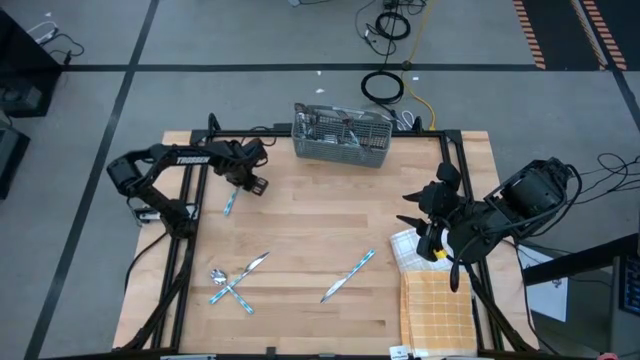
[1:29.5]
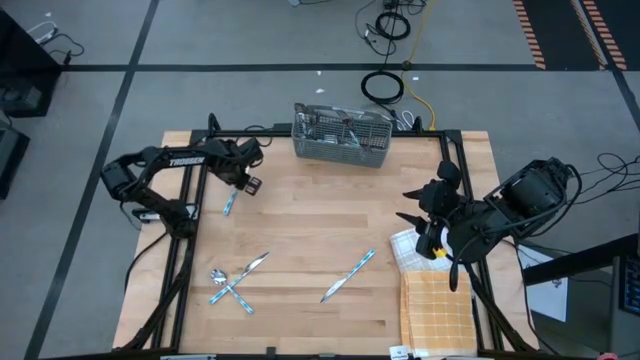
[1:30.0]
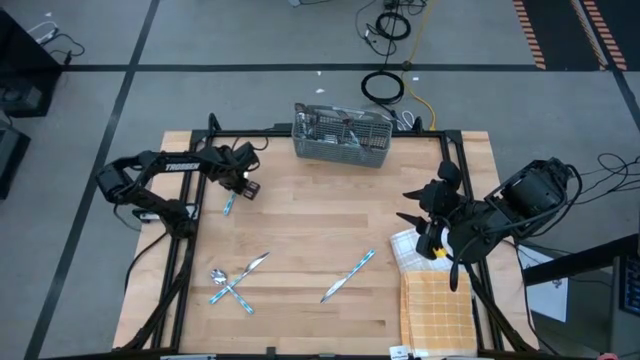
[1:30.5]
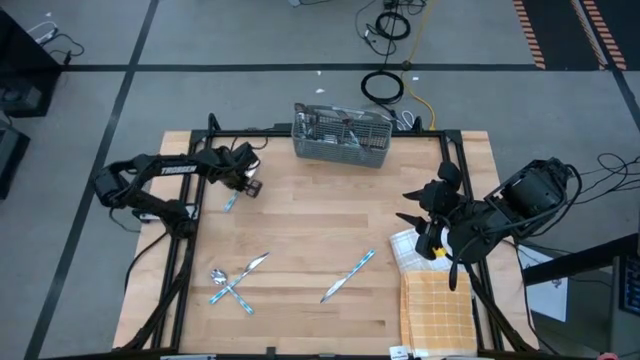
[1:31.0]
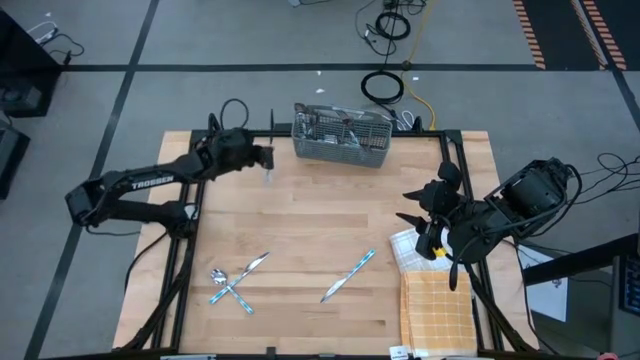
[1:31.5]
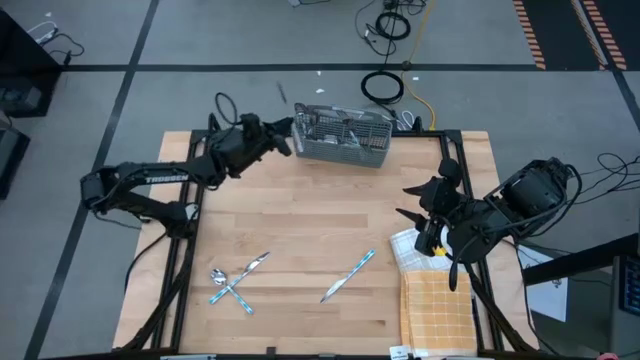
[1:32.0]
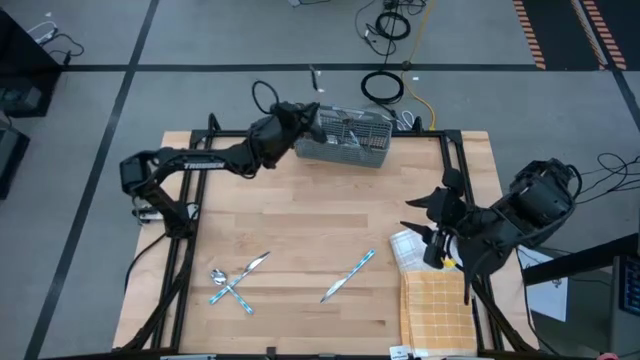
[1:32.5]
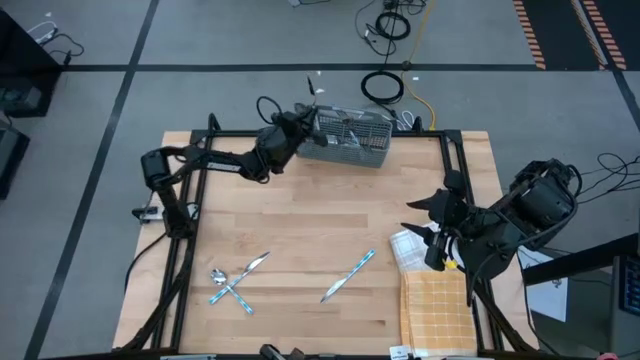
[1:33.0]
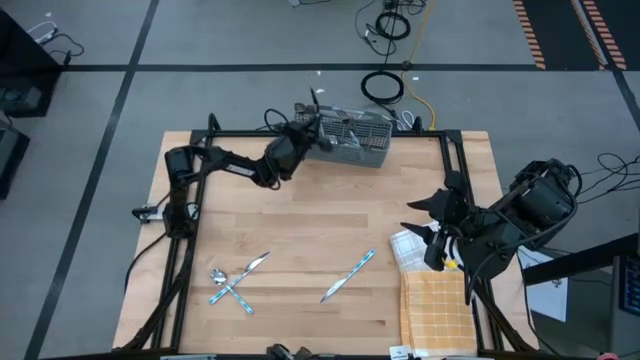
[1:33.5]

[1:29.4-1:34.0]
Task: Sort silverware
Put the top left blue table knife into the gray silverware basket

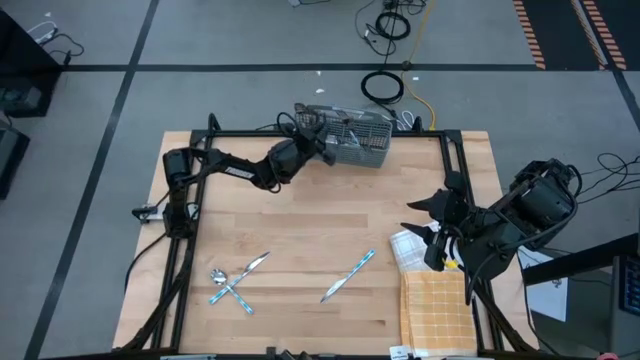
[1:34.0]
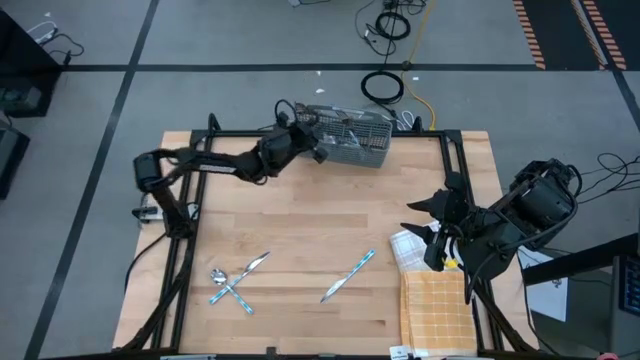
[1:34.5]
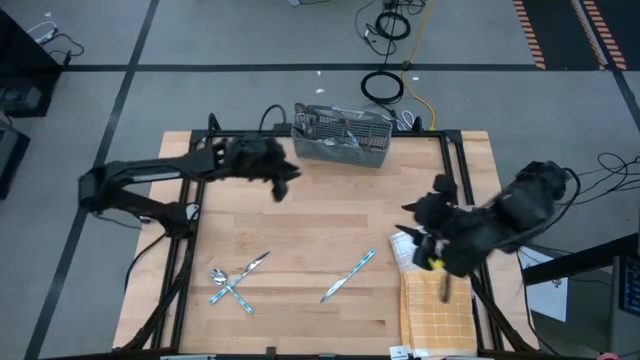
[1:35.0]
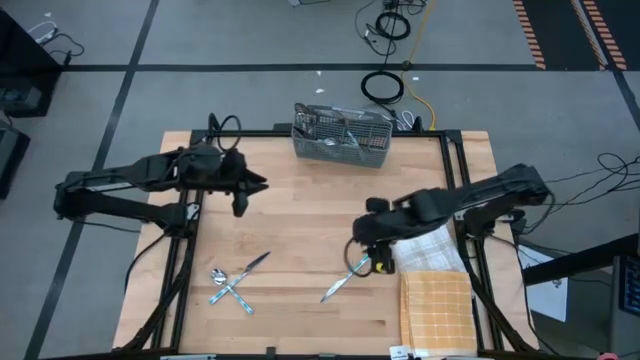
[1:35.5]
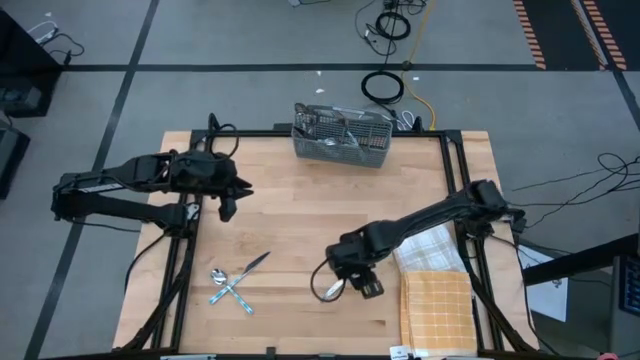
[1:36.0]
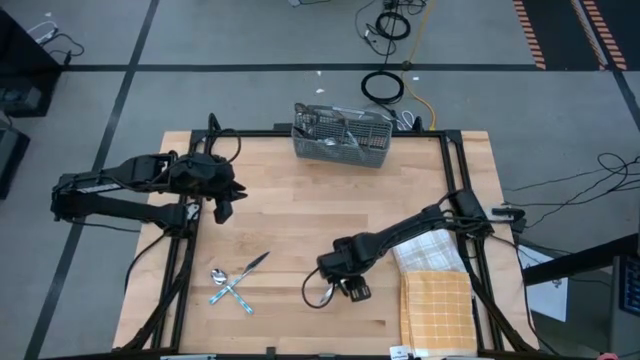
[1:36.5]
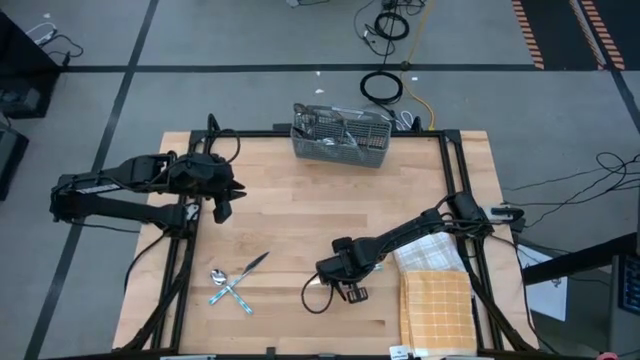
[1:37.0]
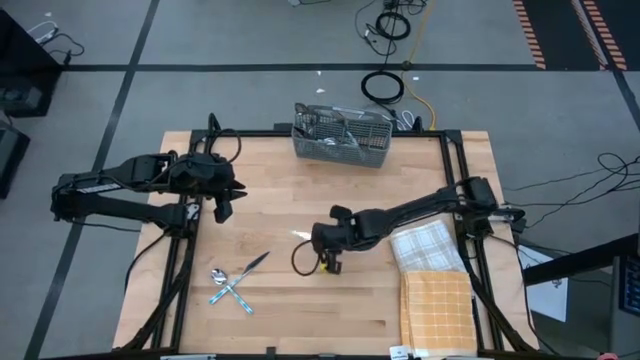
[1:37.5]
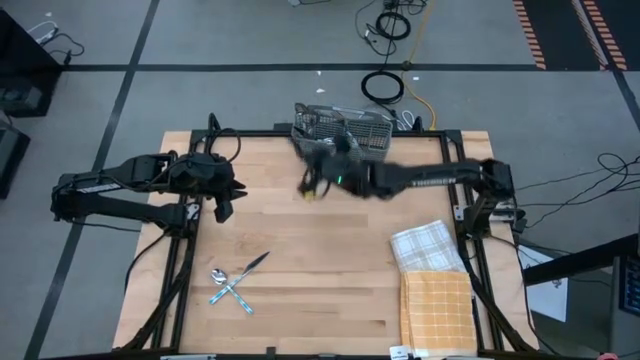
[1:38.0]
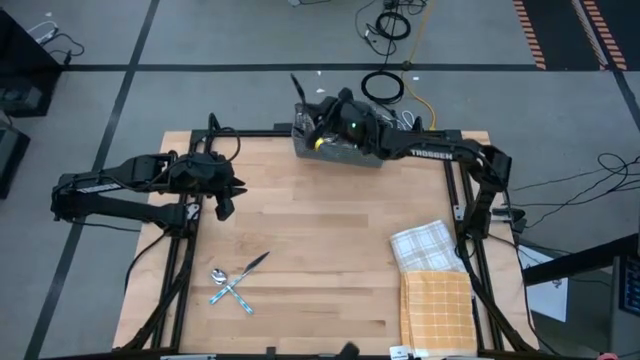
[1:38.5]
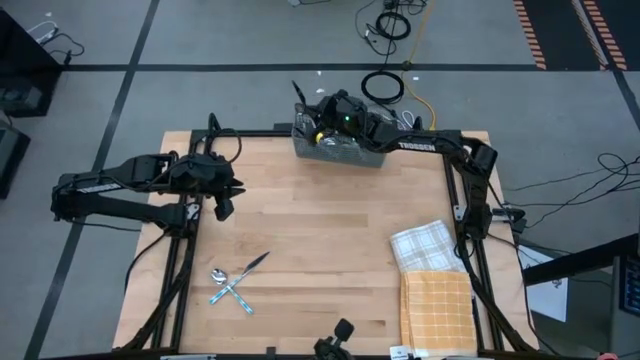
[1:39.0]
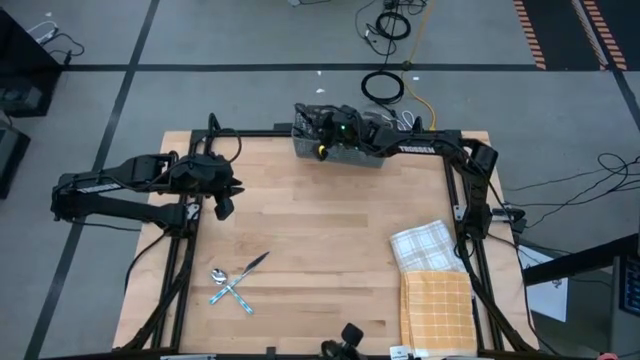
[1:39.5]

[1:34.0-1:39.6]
Put the right blue table knife into the gray silverware basket

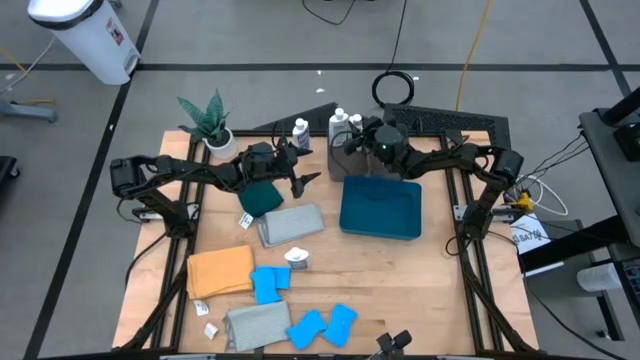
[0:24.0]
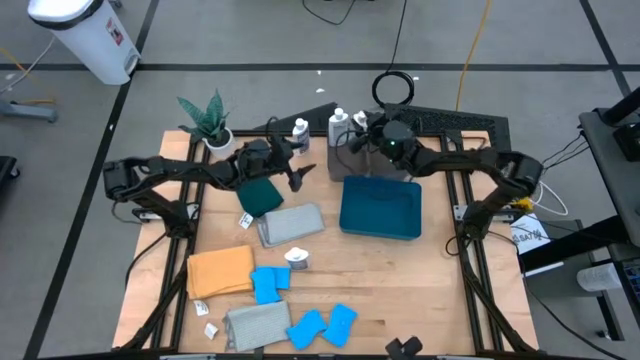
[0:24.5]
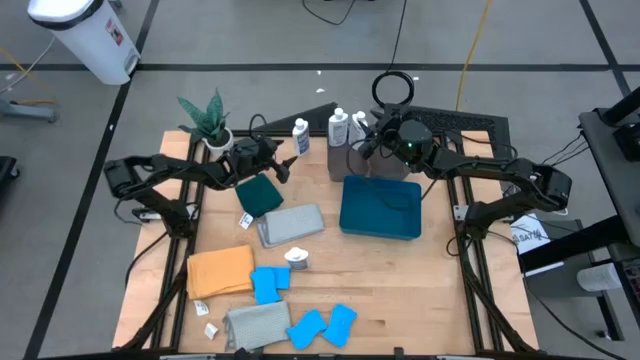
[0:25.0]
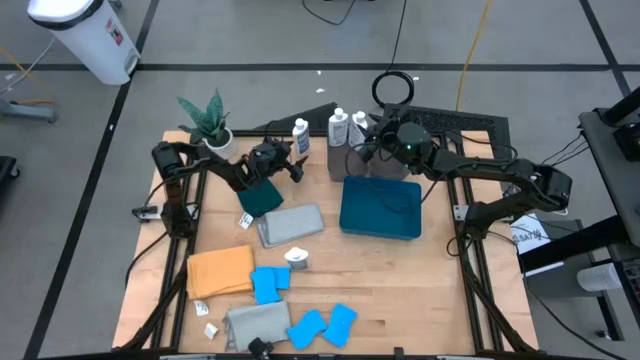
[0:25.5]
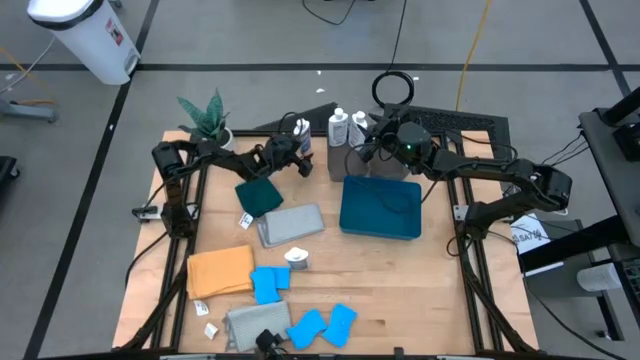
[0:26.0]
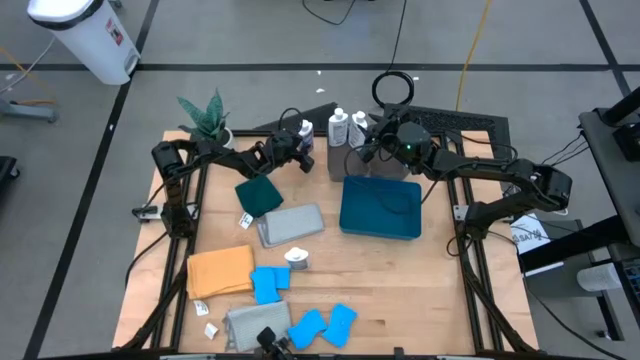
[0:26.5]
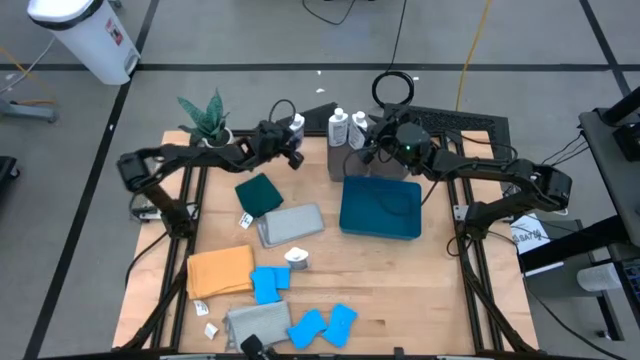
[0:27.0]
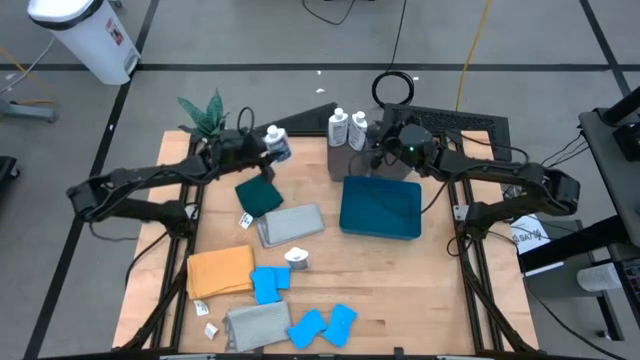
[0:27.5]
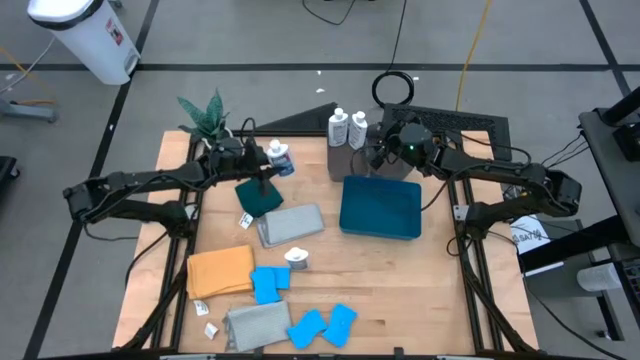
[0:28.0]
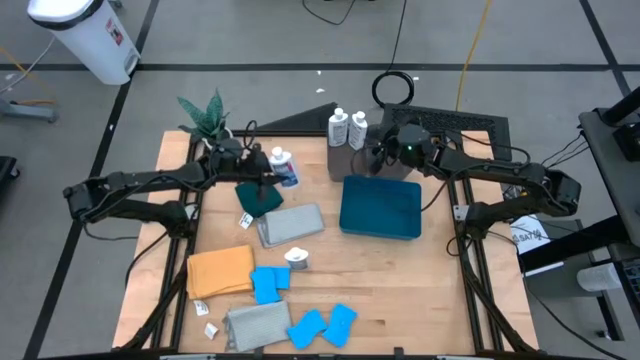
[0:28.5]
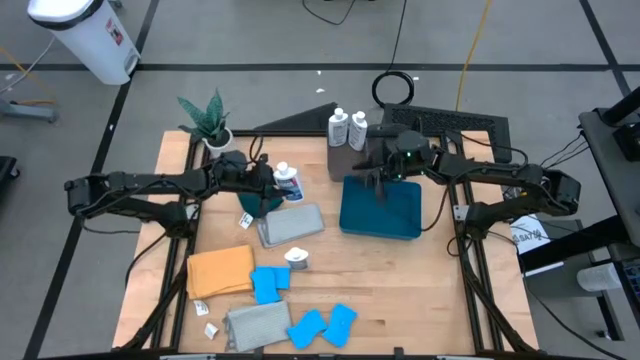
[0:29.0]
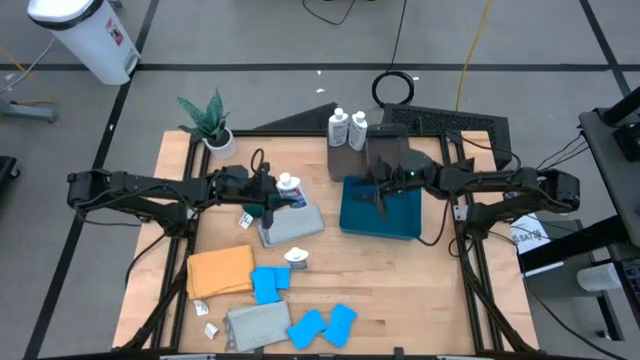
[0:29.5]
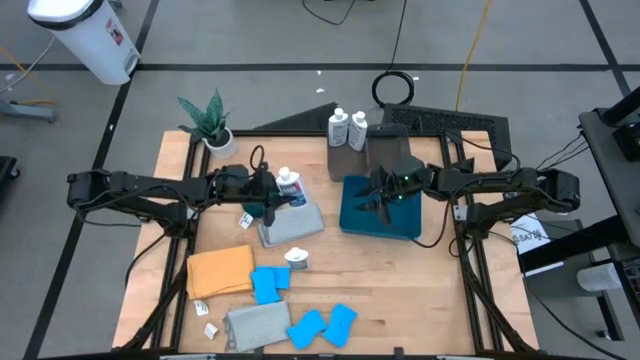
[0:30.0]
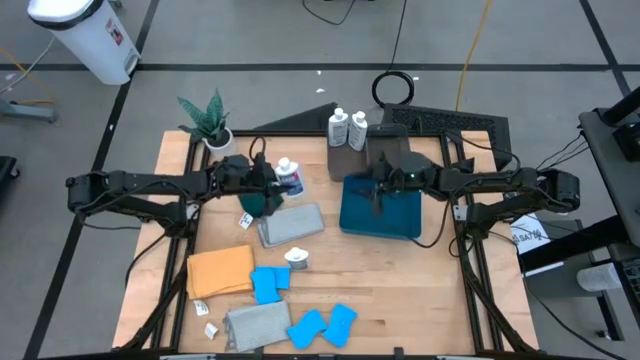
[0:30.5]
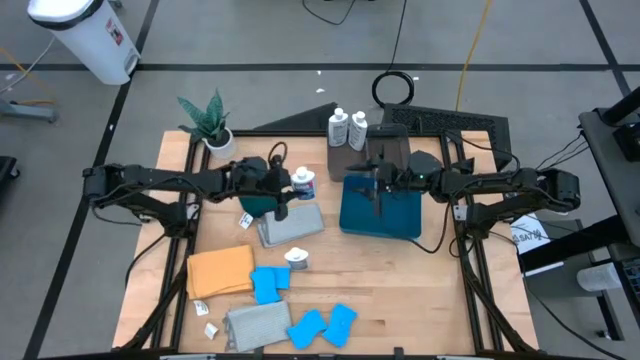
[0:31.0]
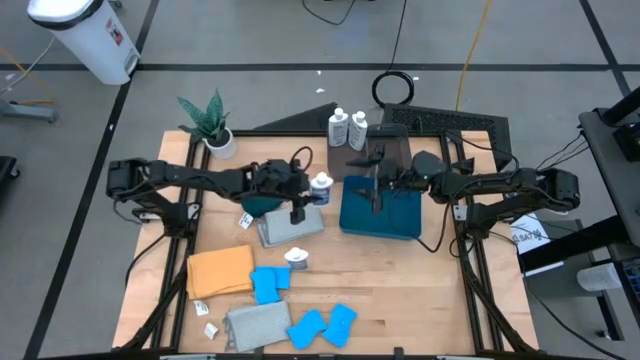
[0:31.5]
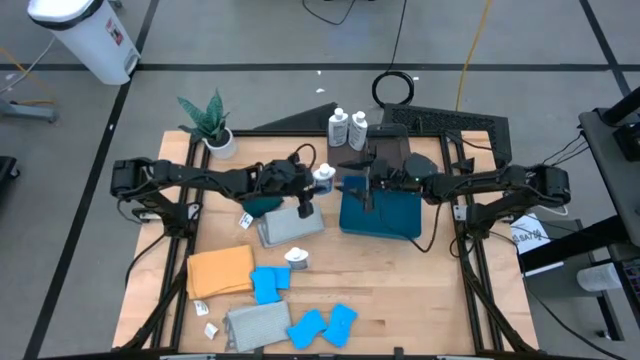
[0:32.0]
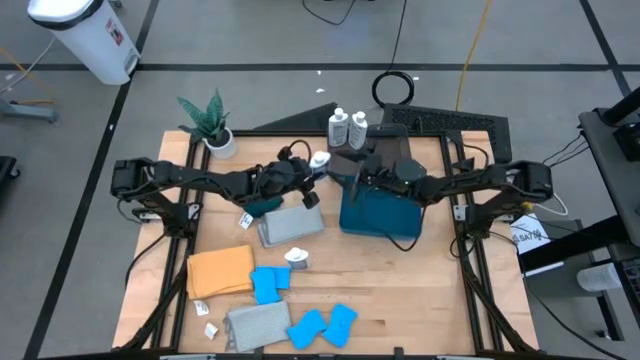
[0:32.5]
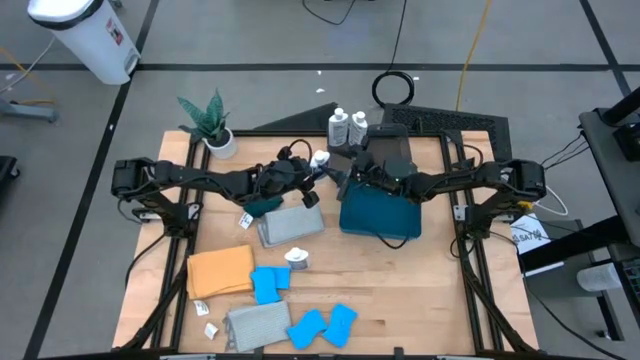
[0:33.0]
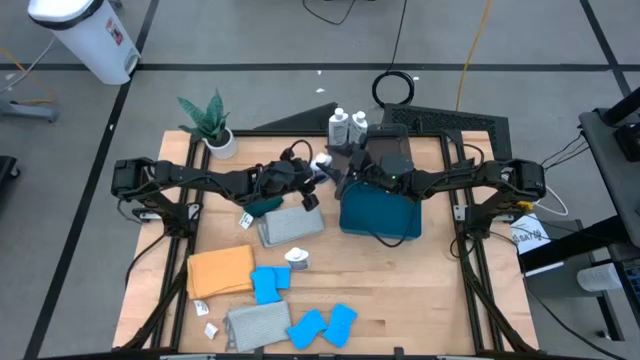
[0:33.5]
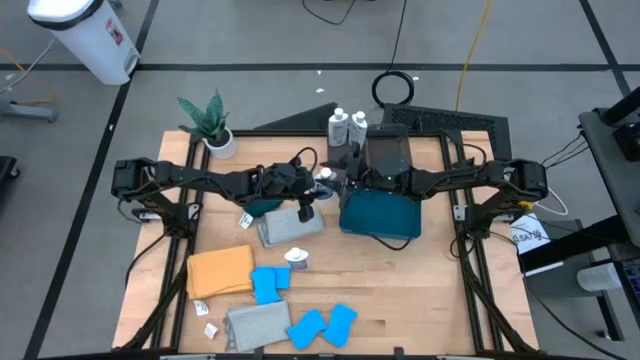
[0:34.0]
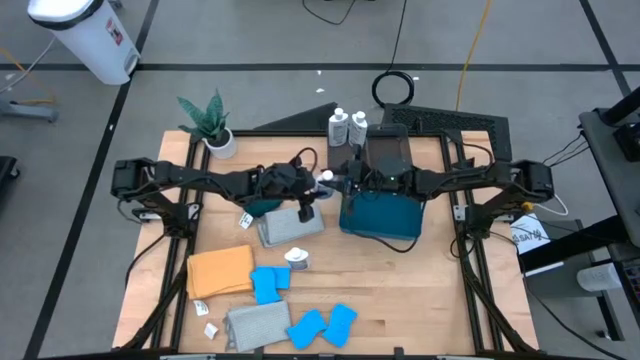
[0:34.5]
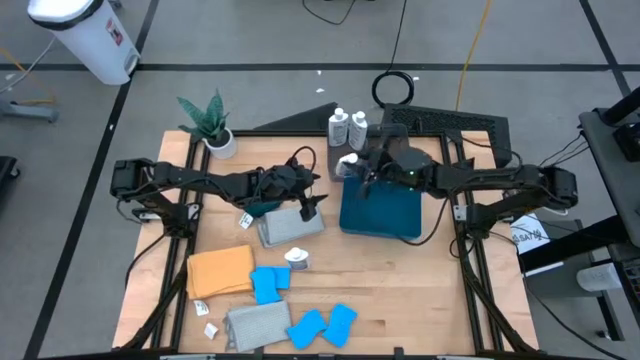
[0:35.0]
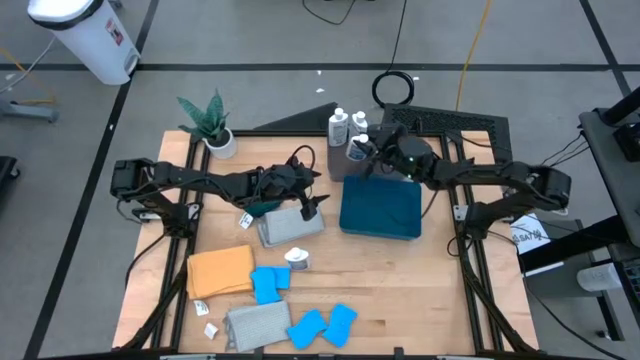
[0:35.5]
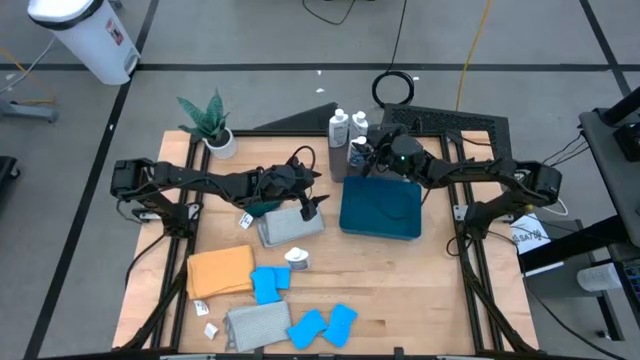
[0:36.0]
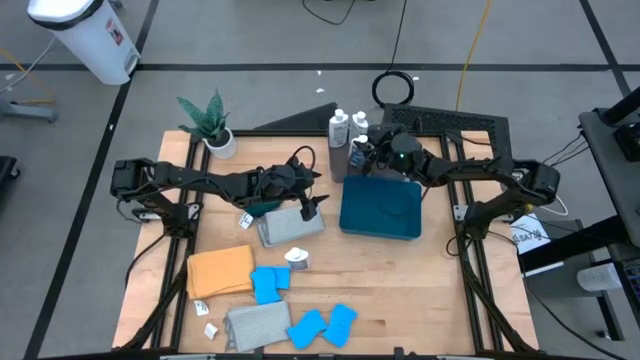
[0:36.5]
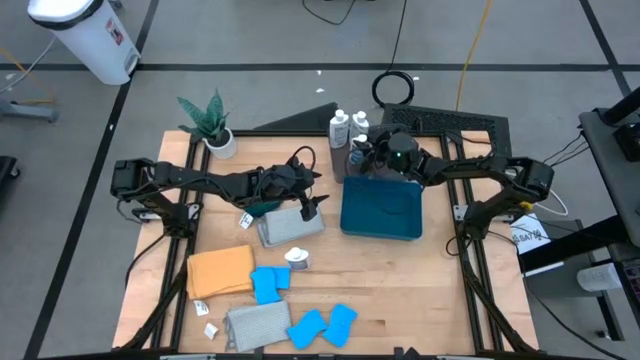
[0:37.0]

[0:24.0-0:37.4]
Task: Pick & Place Kitchen Items
Put the white clear plastic restorer into the left black bin
